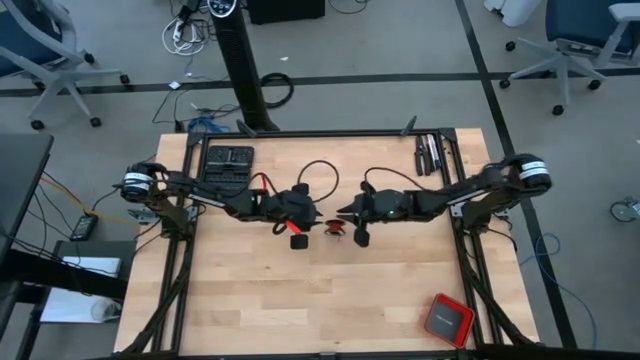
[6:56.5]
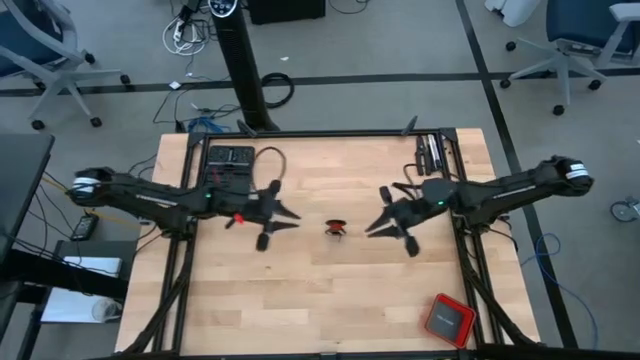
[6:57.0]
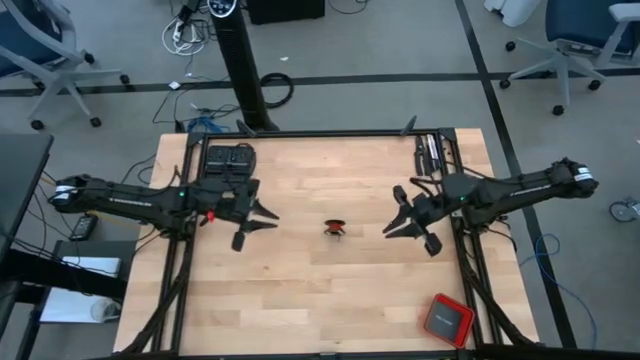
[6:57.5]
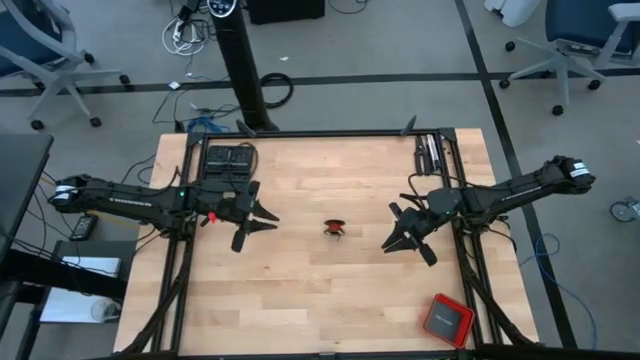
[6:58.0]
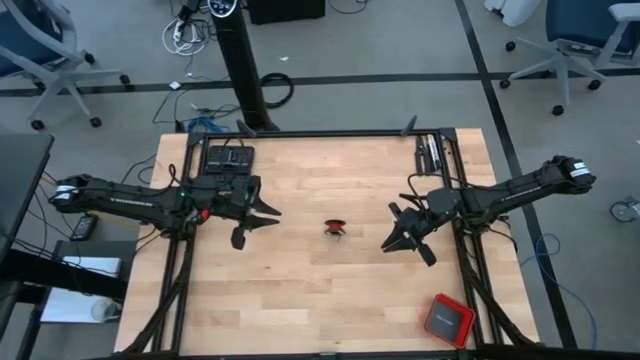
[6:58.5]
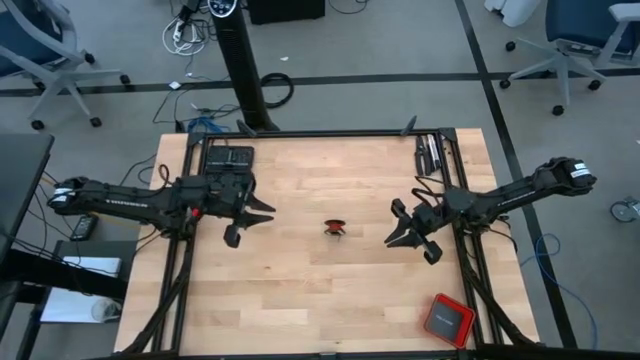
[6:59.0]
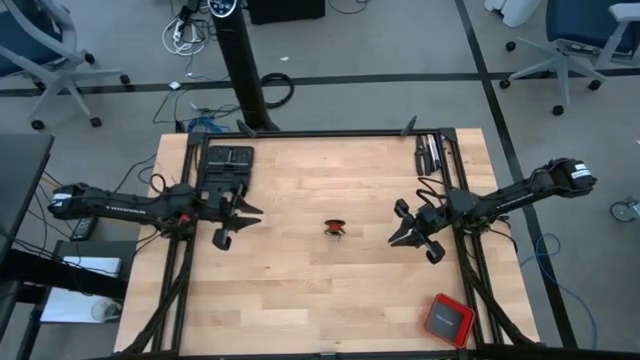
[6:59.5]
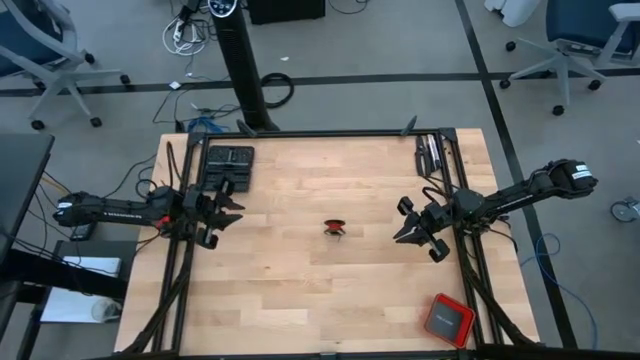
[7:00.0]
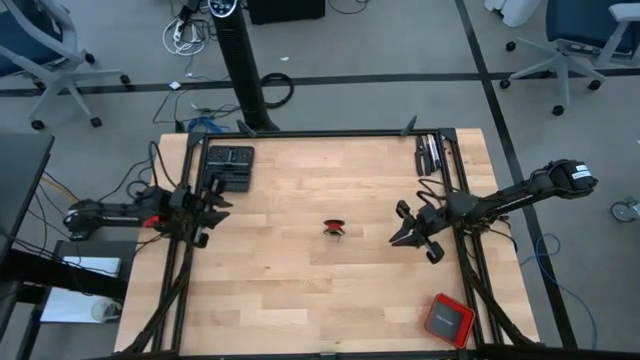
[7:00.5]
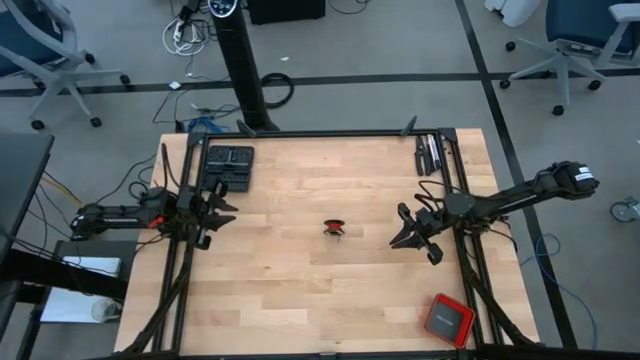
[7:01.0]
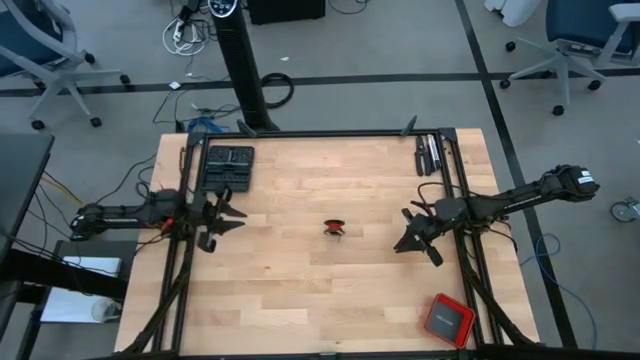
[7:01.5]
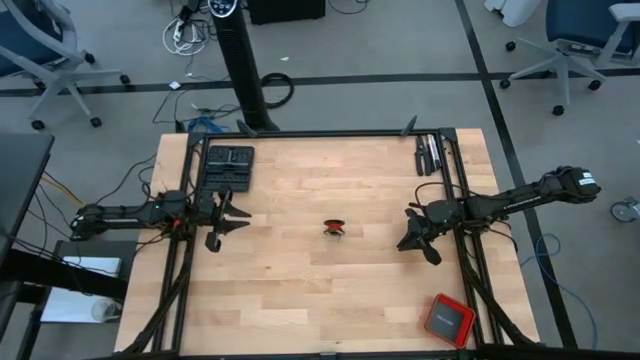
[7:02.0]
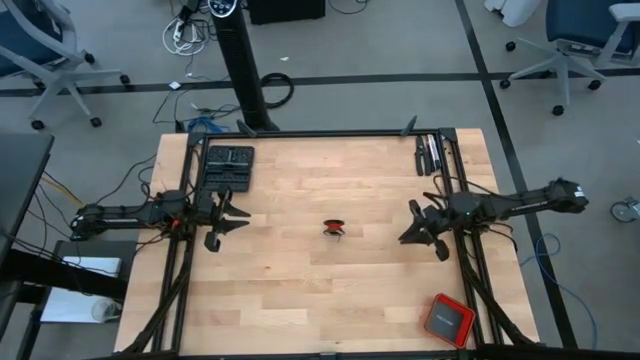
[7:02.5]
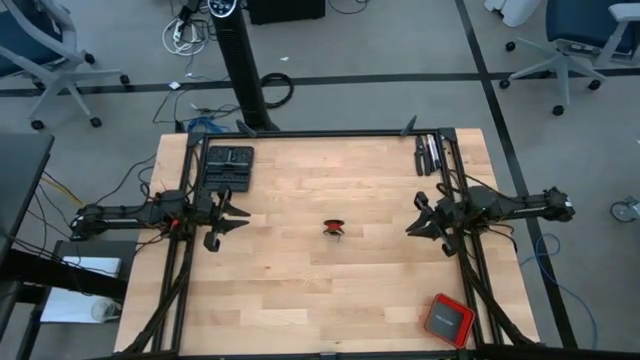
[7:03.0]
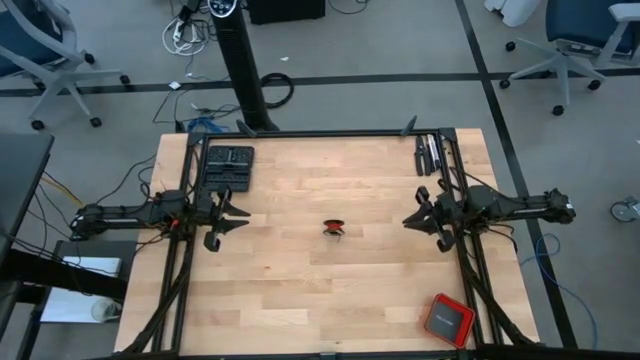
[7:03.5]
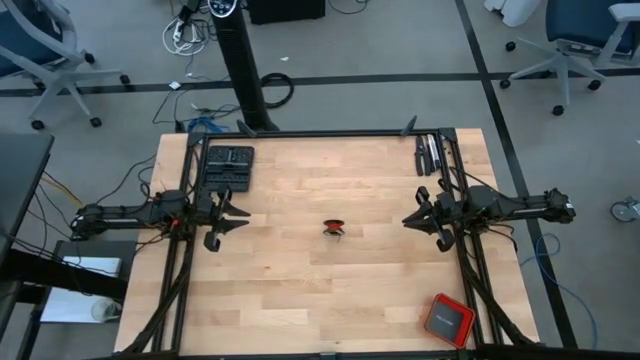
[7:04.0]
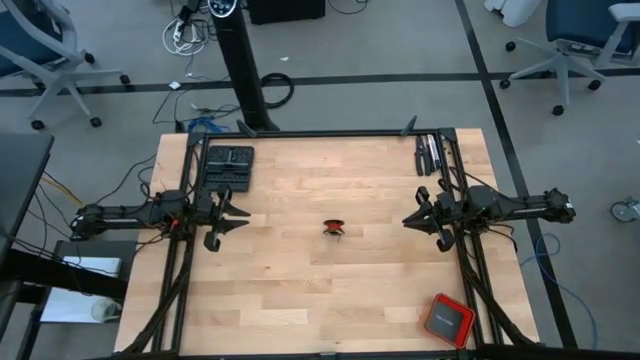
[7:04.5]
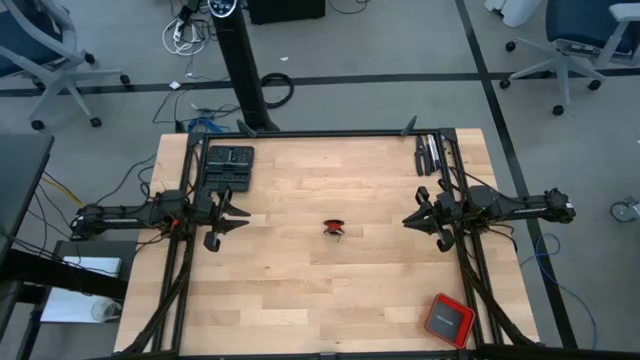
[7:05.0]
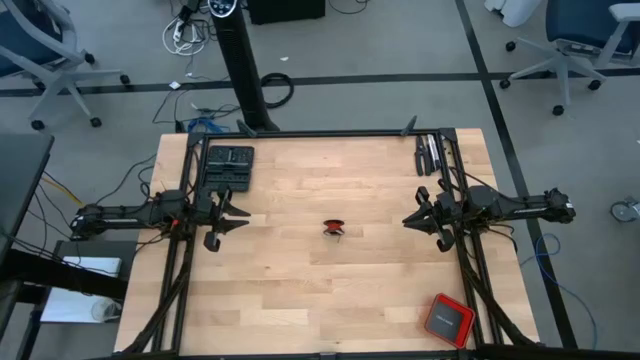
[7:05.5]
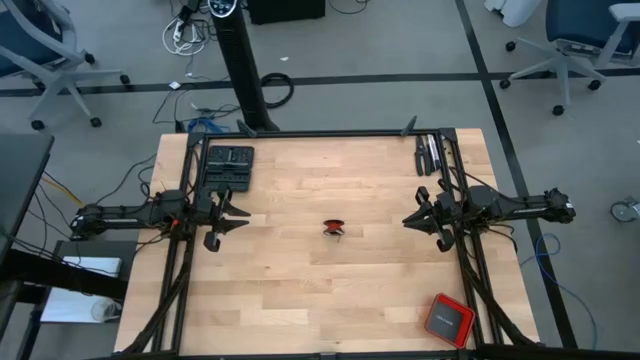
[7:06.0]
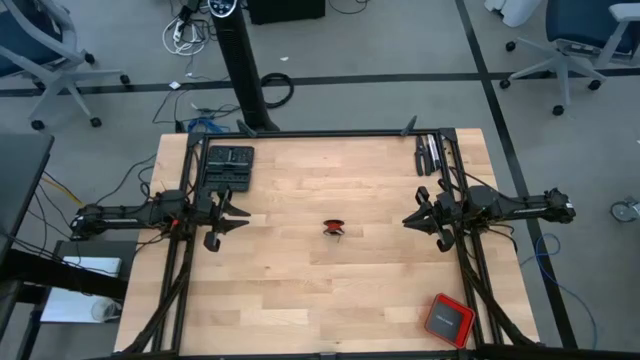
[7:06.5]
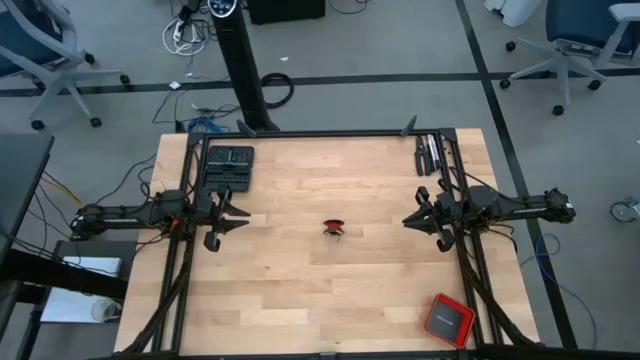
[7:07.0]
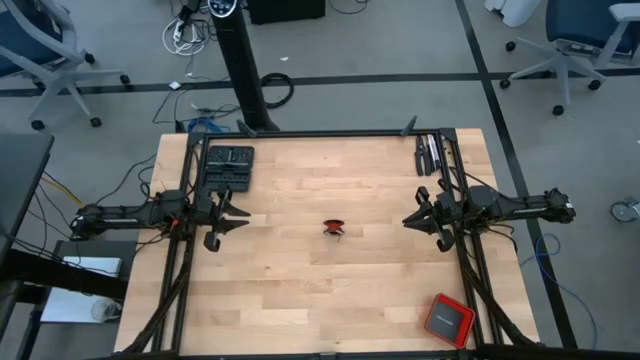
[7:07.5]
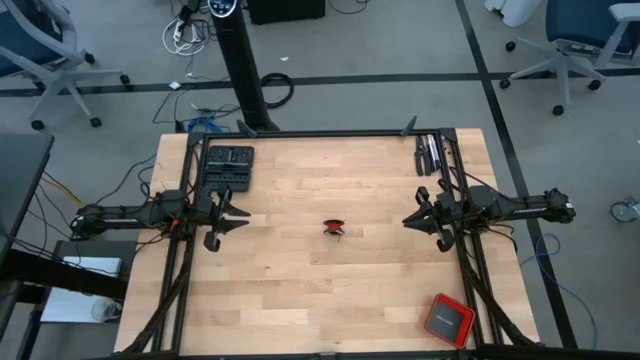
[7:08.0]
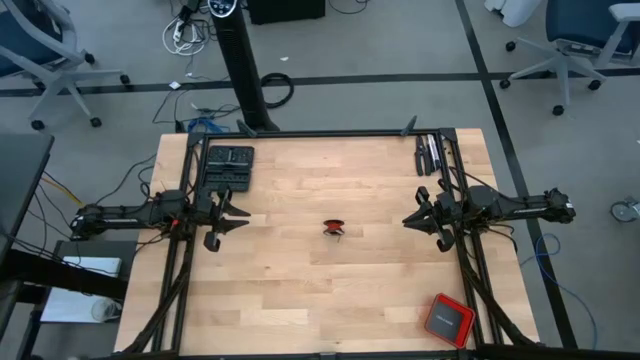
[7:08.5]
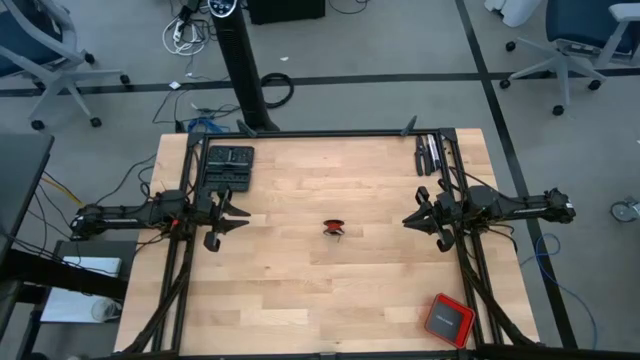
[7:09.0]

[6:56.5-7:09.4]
Task: Coil cords
Return to Home Position

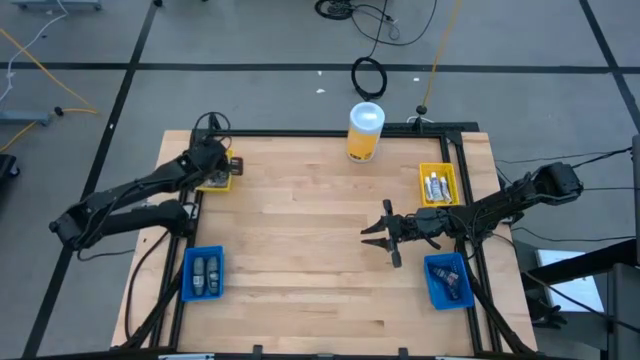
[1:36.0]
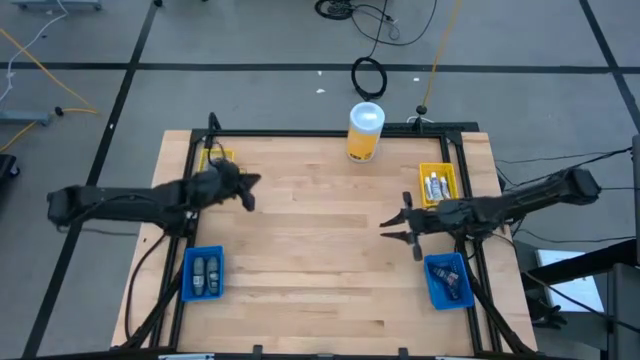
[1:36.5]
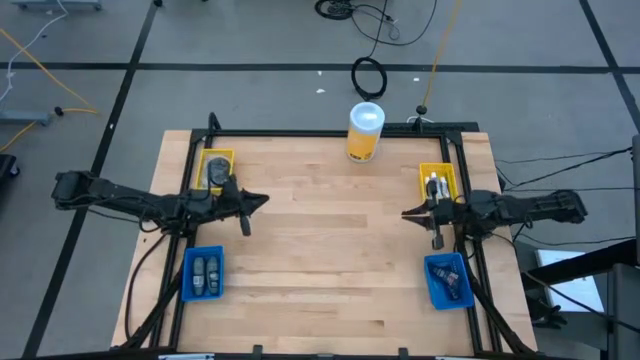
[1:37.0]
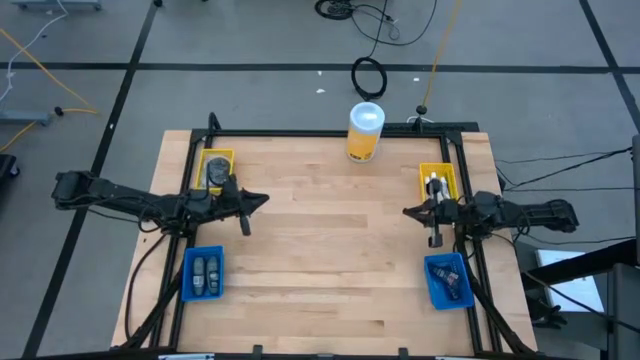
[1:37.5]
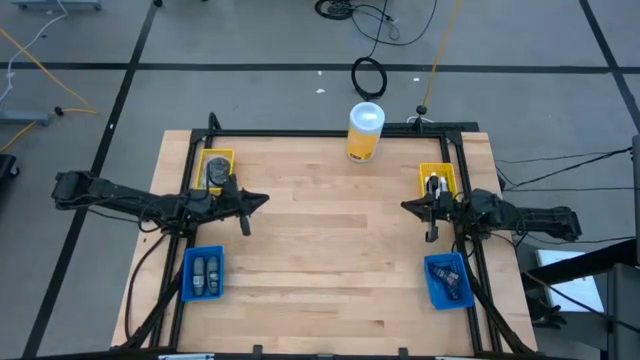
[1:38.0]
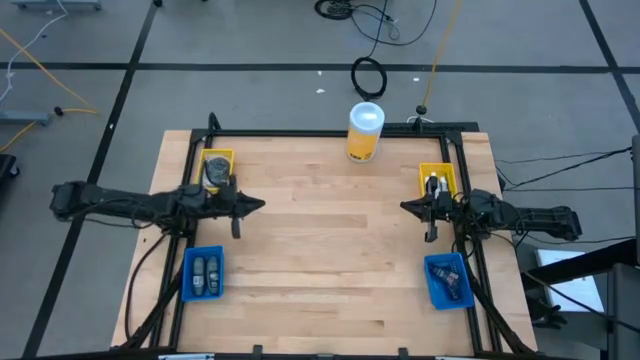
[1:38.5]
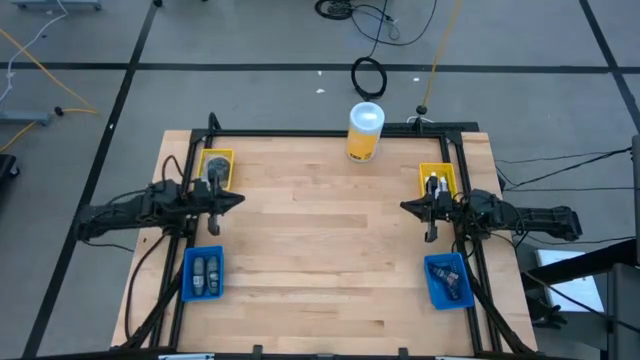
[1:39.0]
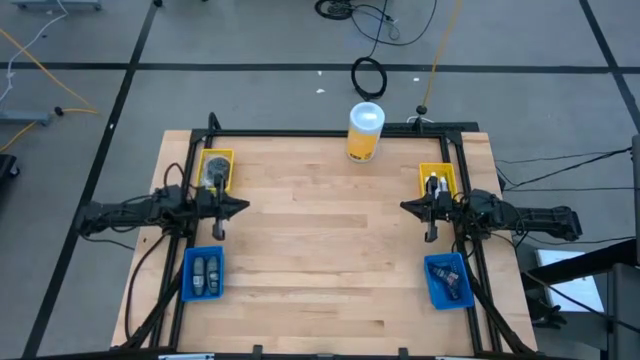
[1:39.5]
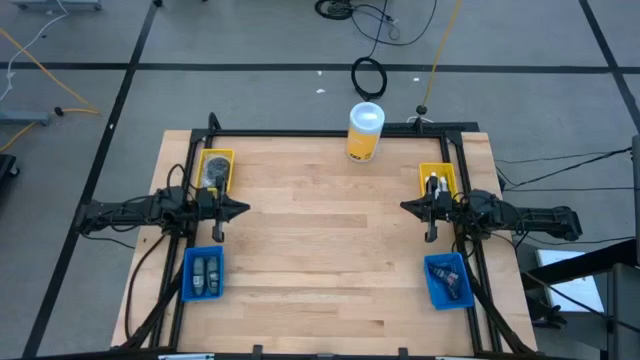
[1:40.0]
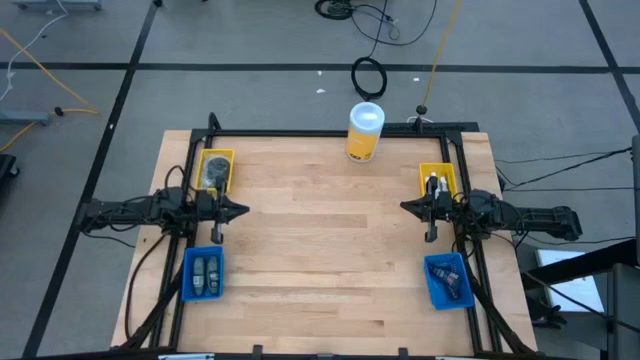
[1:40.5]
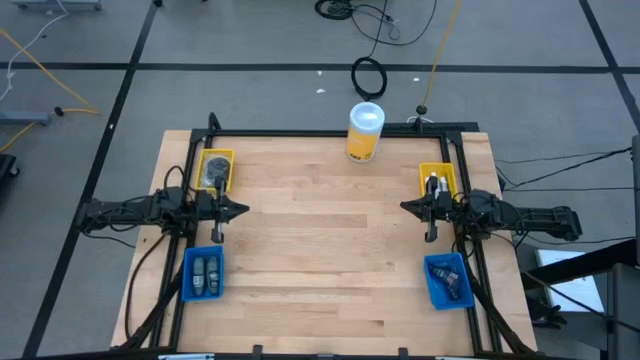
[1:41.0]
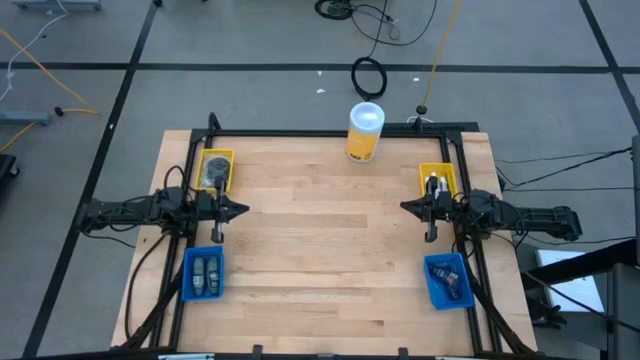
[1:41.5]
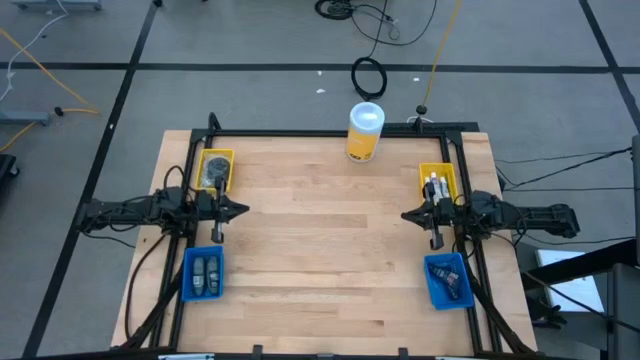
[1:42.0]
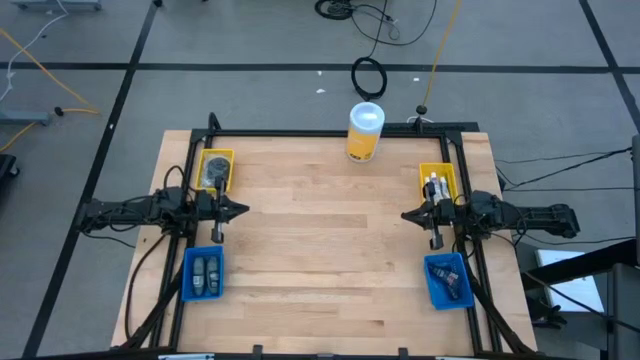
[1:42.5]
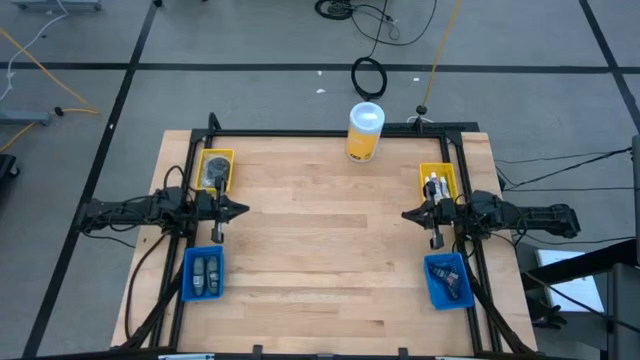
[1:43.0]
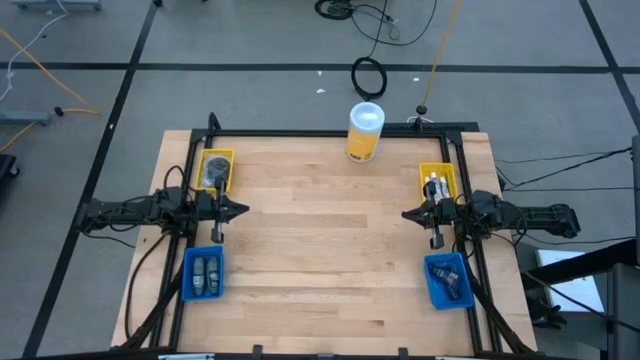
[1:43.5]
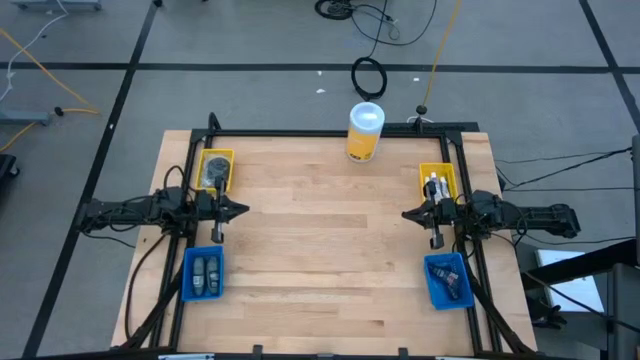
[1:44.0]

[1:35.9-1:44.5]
Task: Pick & Place Travel size toiletries
Return to Home Position
